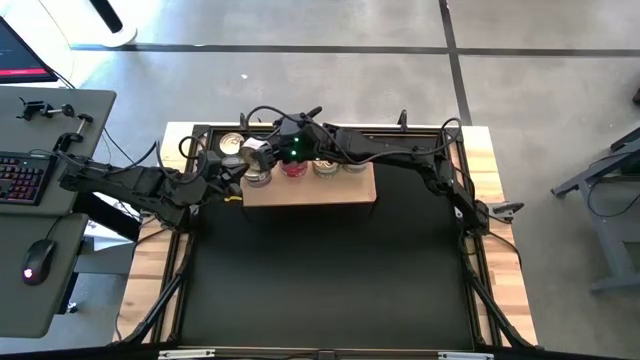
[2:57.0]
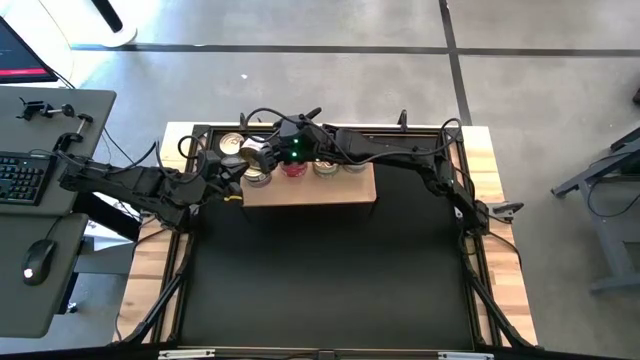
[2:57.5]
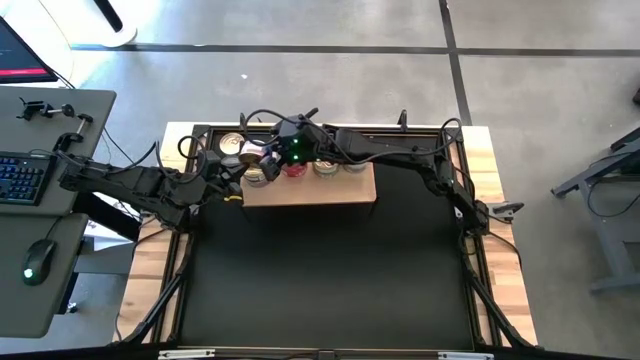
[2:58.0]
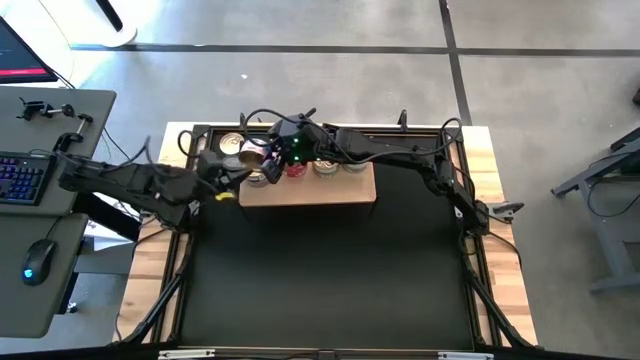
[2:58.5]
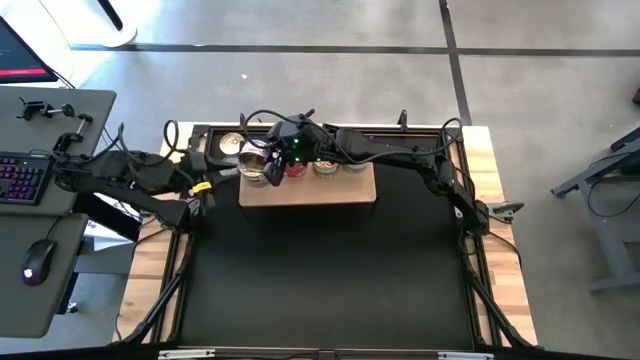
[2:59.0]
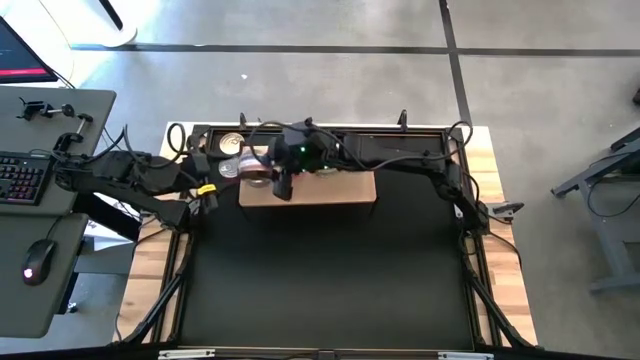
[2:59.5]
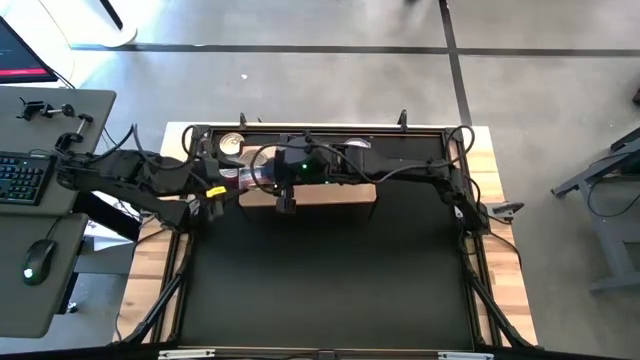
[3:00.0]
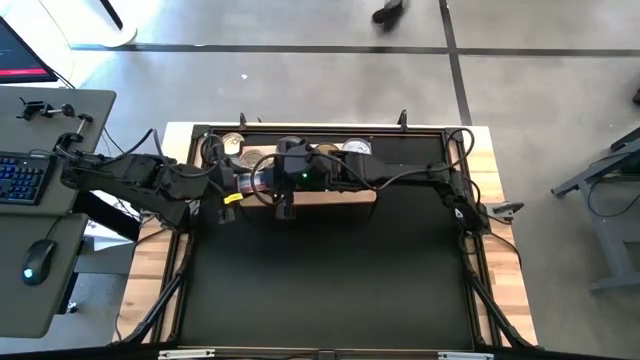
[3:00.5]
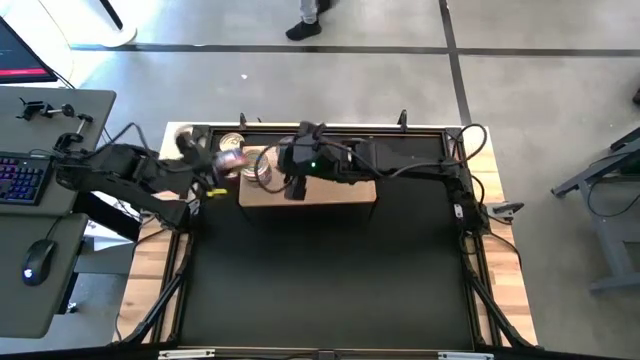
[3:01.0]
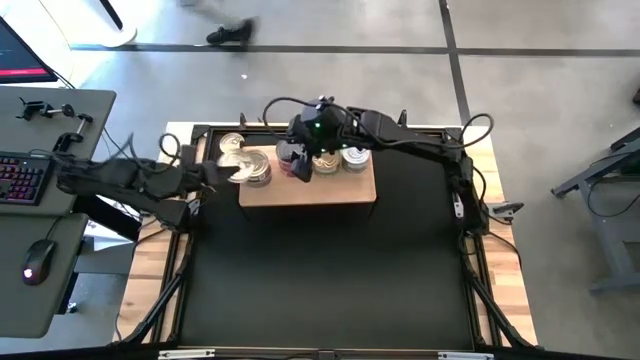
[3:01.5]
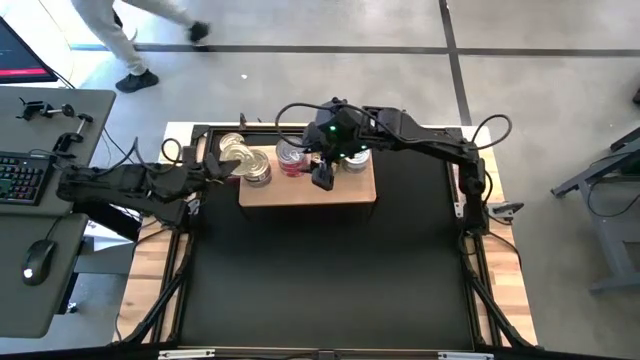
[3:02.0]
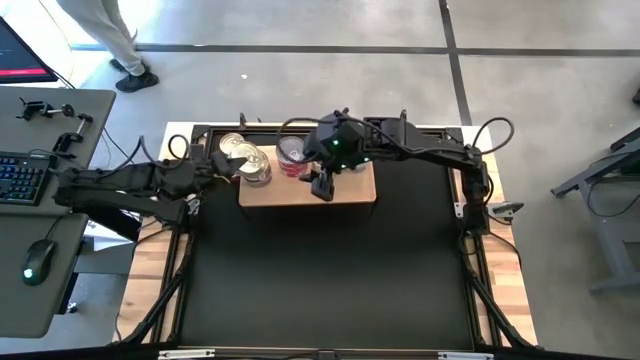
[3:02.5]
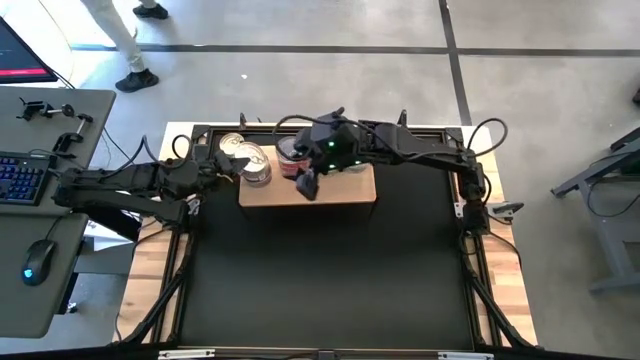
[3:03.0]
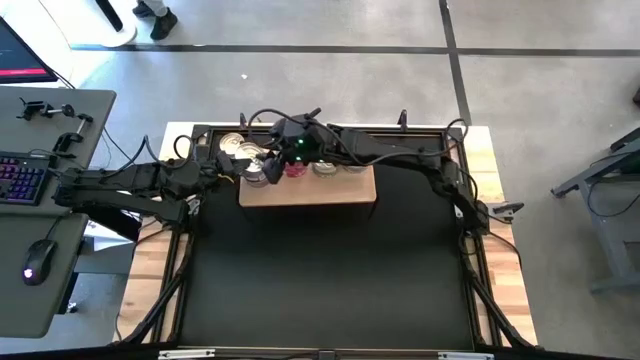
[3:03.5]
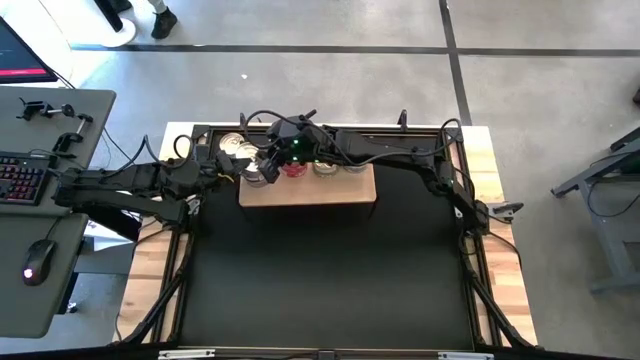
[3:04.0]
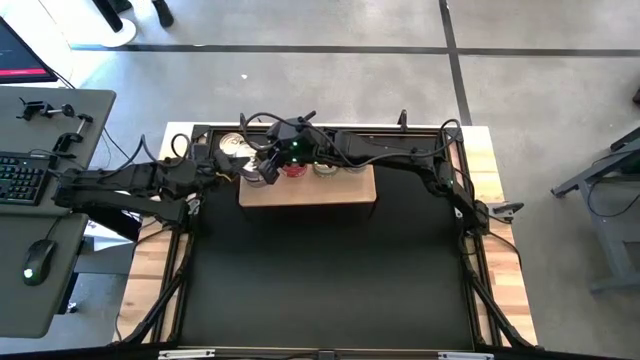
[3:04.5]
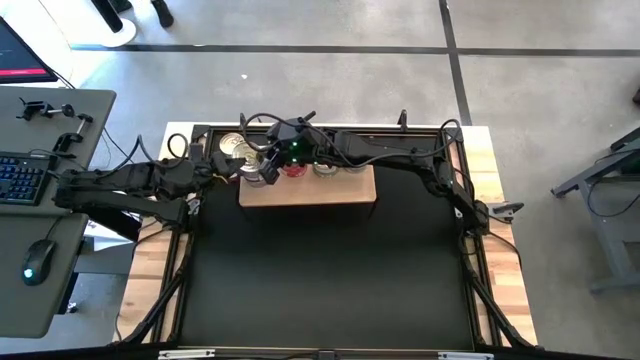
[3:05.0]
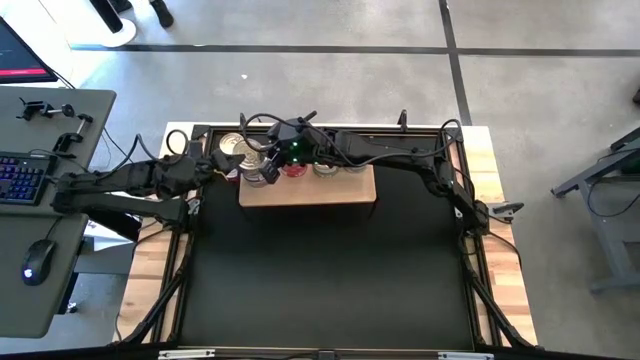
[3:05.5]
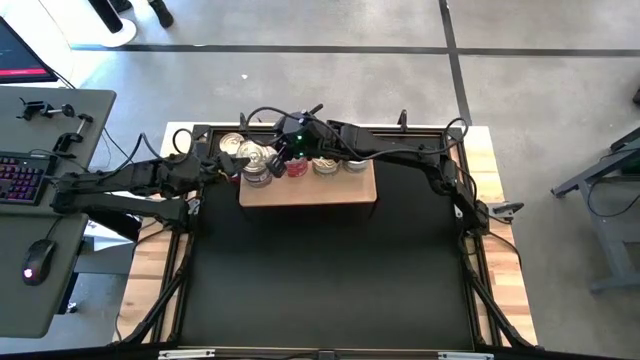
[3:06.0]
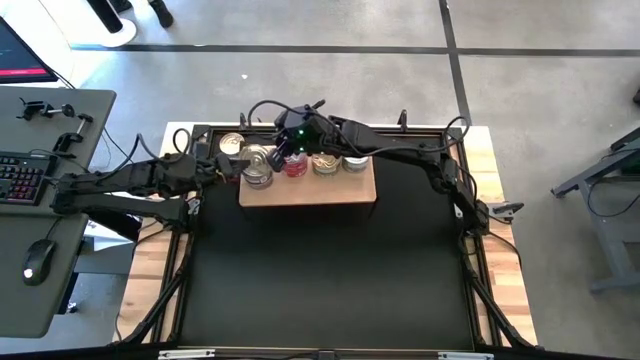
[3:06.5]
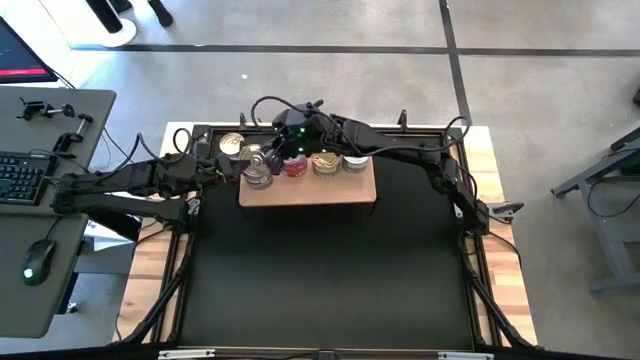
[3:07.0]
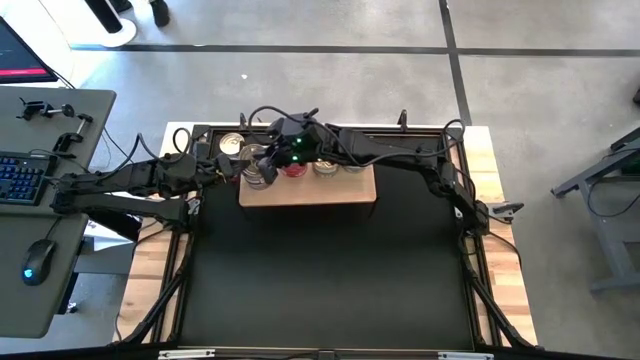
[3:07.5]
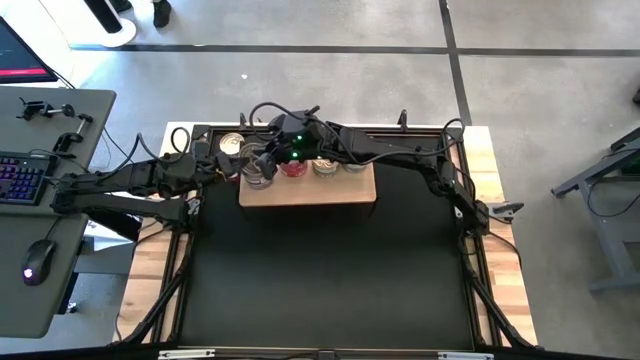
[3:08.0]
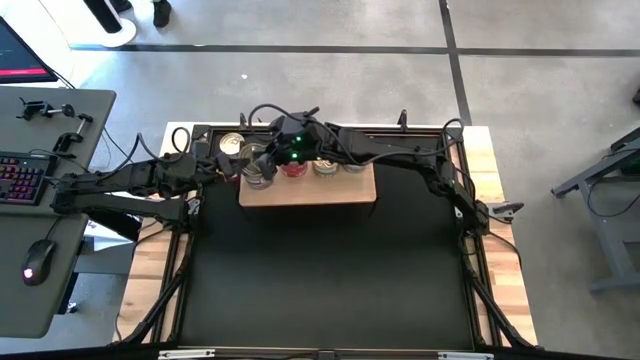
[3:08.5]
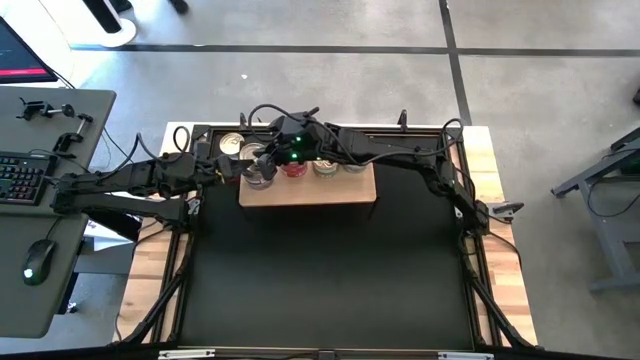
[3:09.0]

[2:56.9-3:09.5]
Task: Stack canned seafood by type on shelf
Stack the right blue and red tuna can on top of the blue and red tuna cans on the shelf

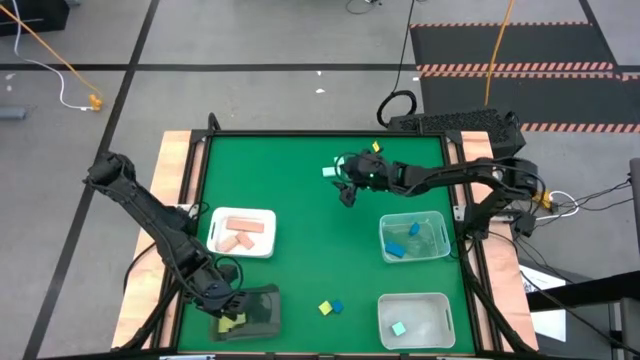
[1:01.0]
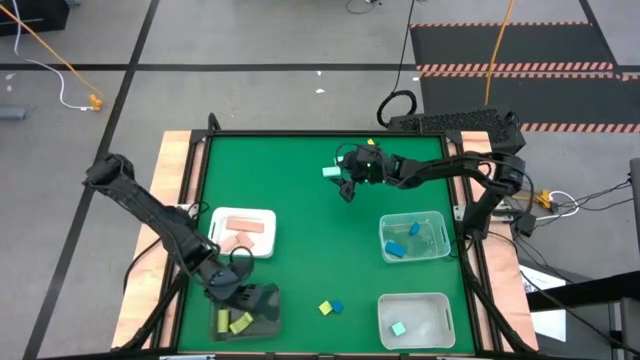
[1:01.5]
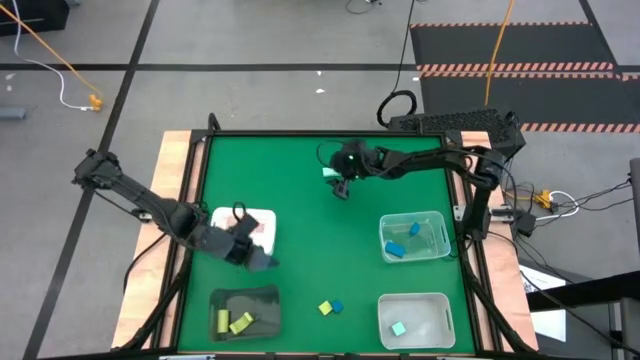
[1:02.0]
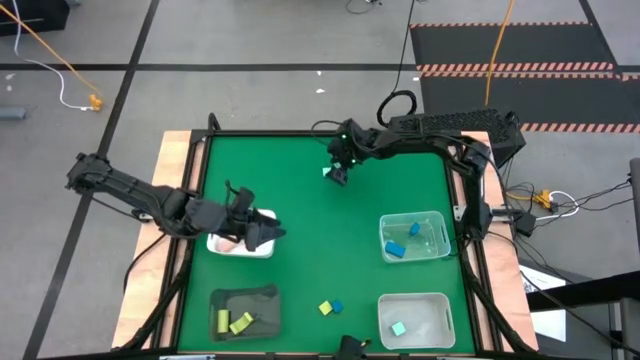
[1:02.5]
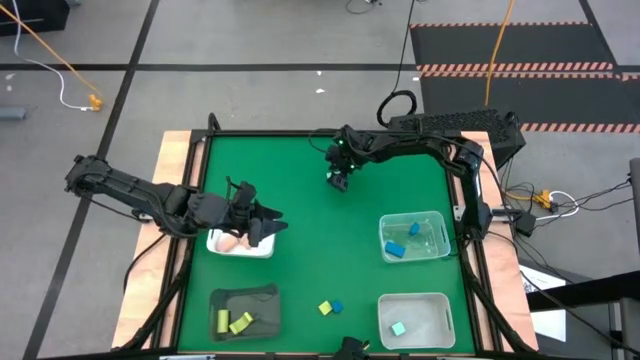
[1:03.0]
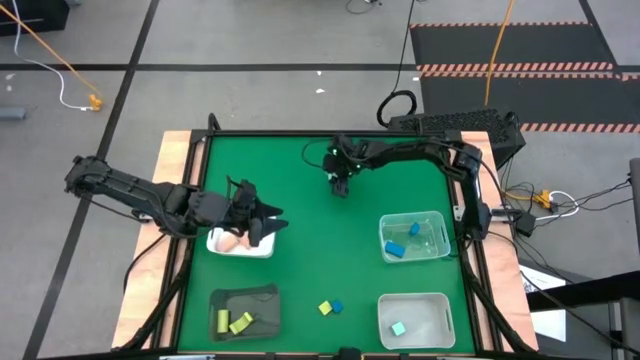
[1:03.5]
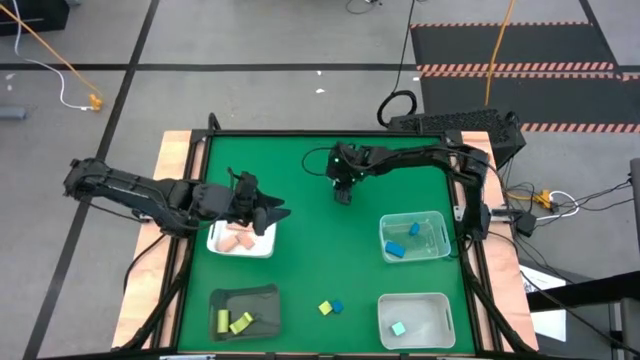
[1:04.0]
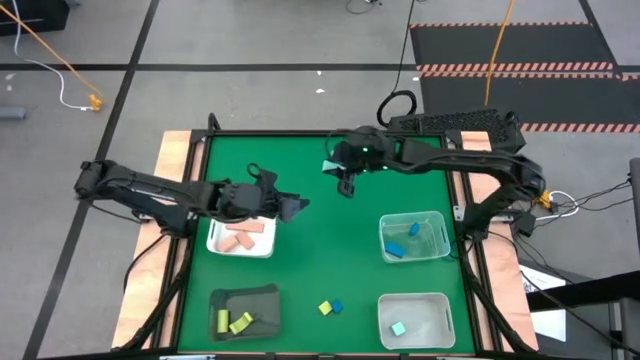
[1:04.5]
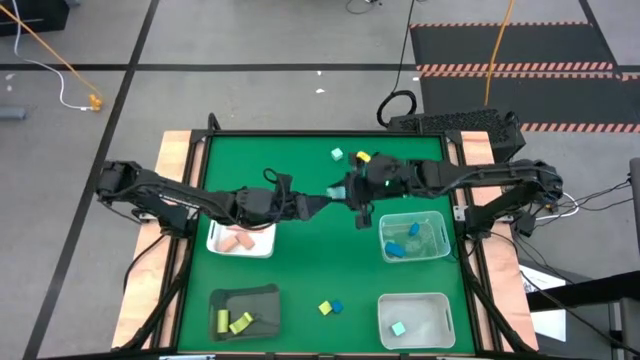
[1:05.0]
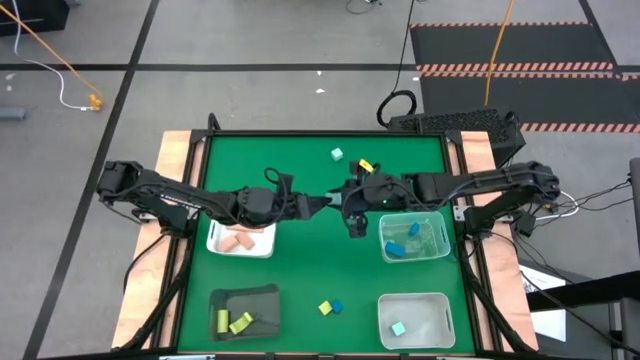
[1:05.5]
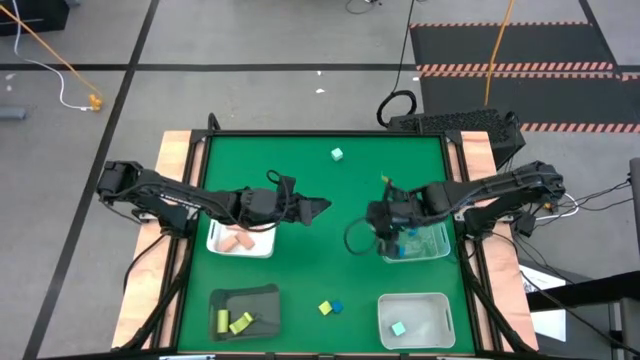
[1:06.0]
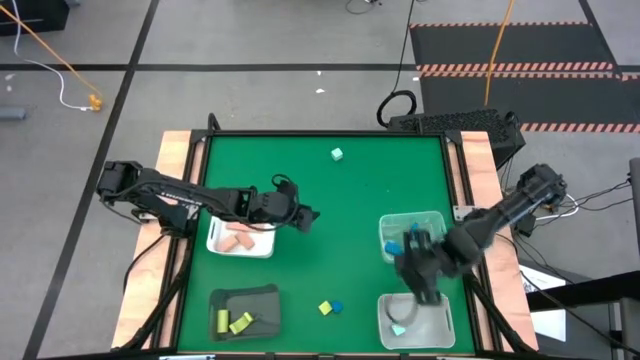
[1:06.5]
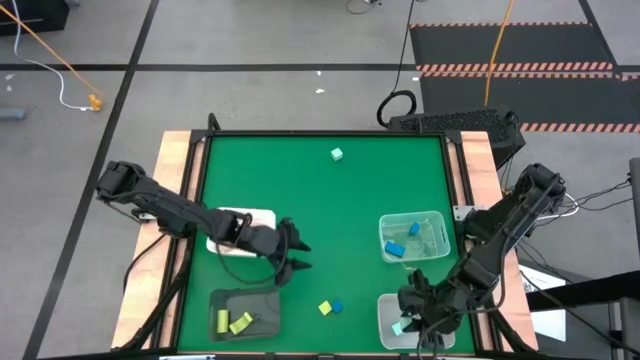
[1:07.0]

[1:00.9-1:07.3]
Task: Sort & place blocks by color
Put the bottom light blue block into the gray bin

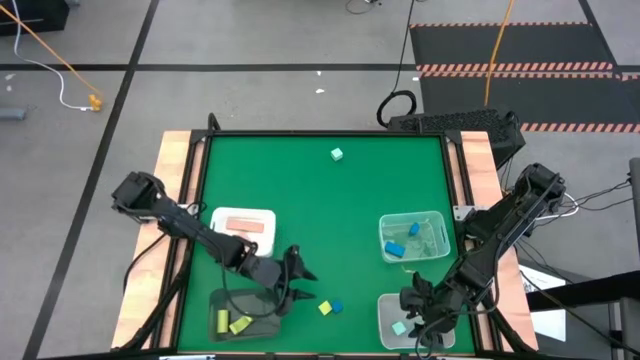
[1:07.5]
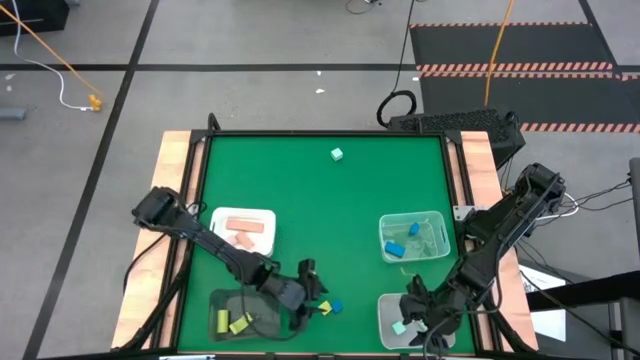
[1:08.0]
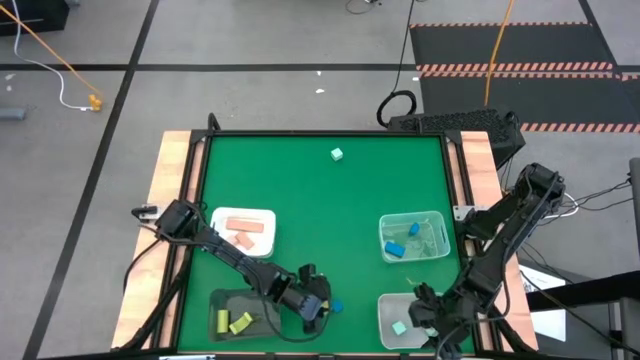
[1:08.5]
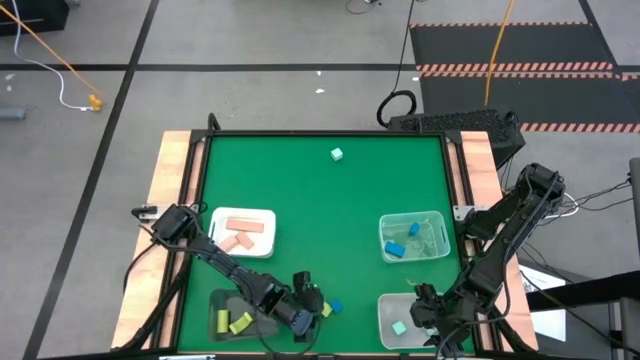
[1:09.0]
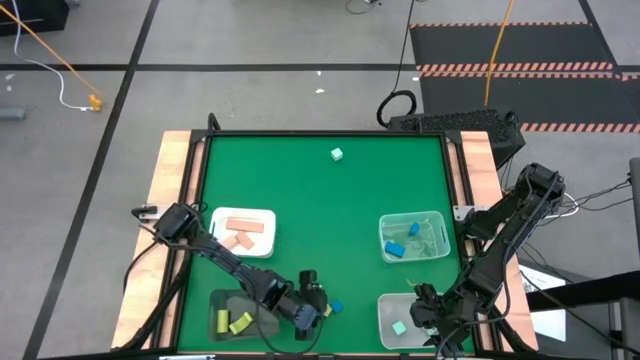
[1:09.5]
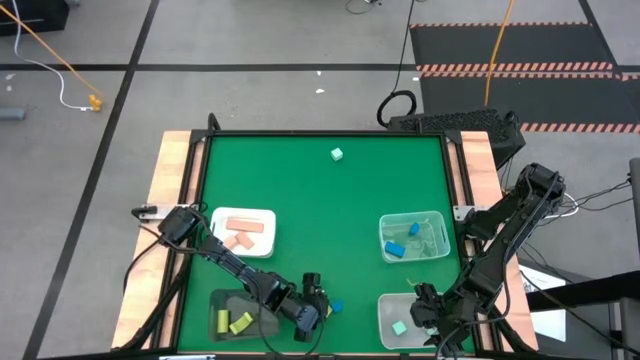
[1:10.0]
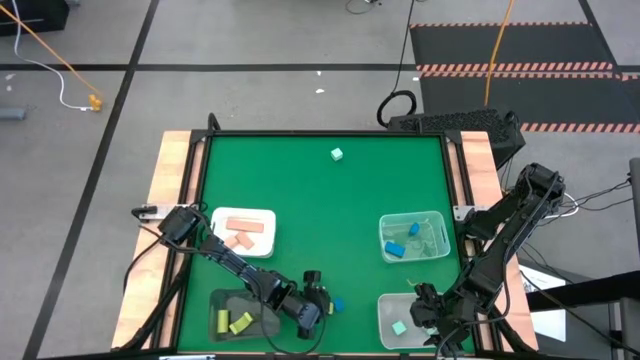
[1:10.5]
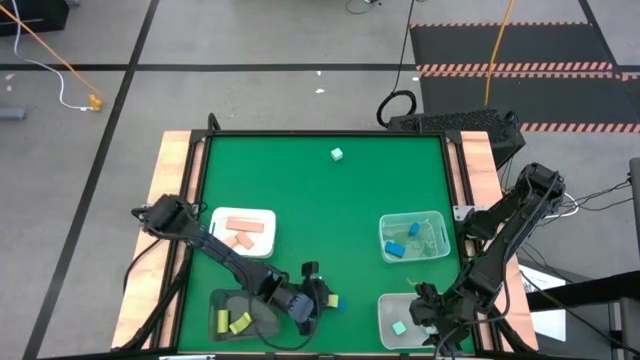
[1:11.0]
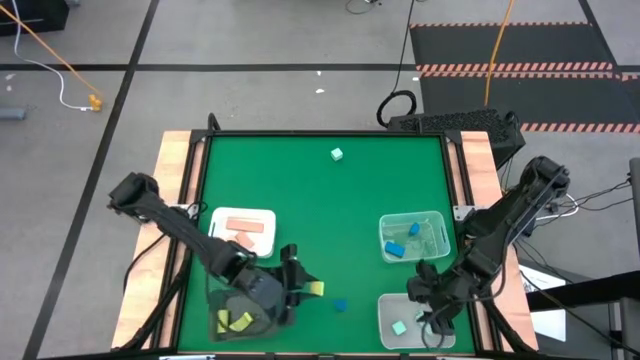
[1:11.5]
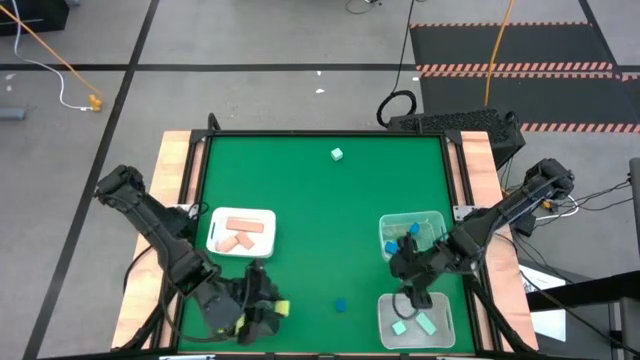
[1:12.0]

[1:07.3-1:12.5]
Put the green block into the black bin
